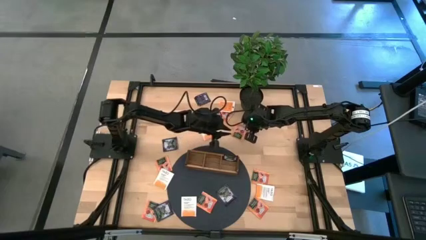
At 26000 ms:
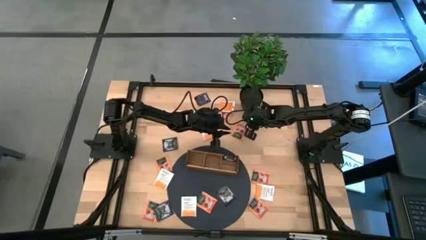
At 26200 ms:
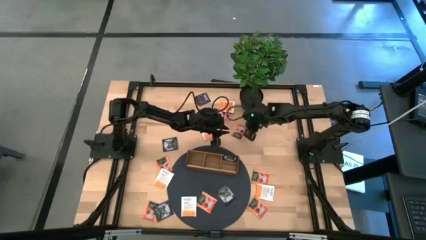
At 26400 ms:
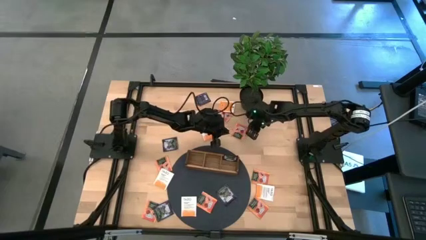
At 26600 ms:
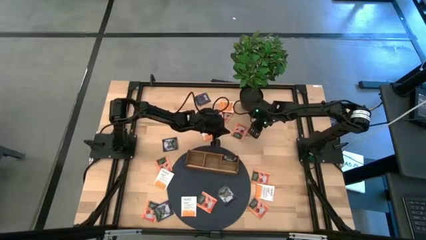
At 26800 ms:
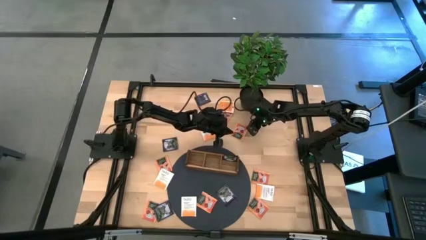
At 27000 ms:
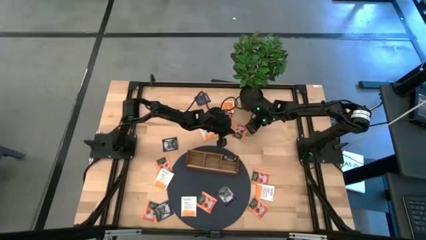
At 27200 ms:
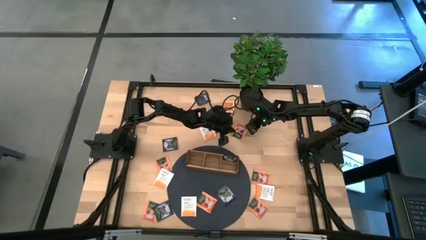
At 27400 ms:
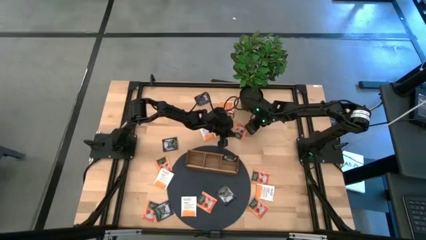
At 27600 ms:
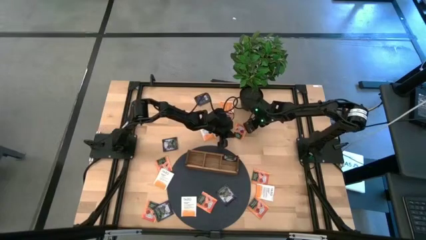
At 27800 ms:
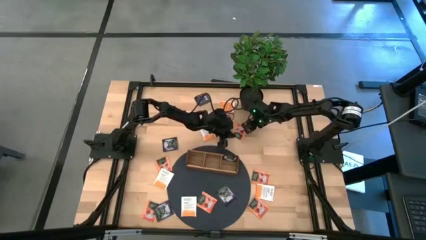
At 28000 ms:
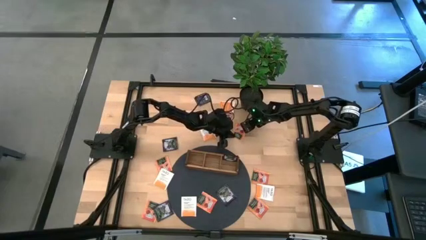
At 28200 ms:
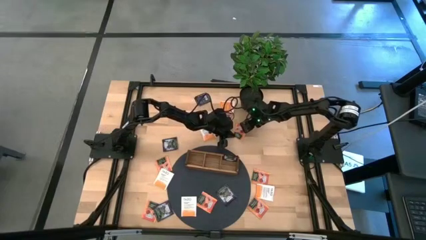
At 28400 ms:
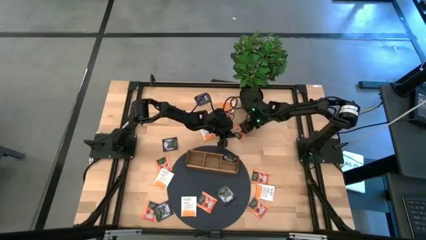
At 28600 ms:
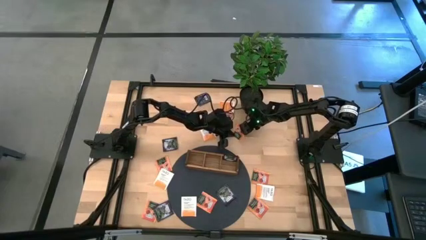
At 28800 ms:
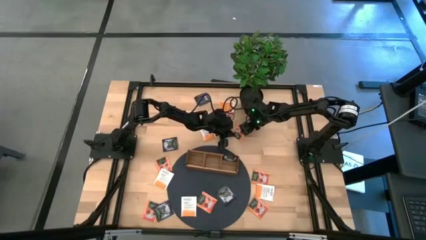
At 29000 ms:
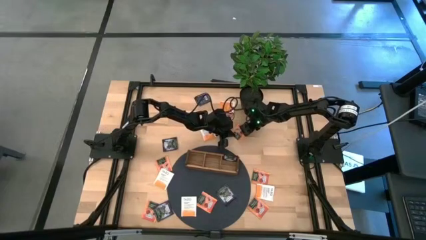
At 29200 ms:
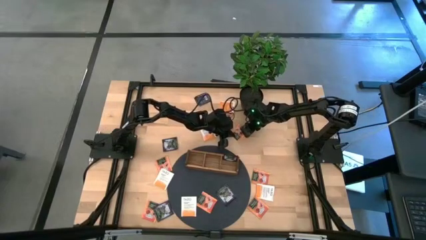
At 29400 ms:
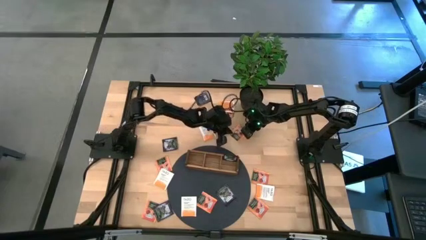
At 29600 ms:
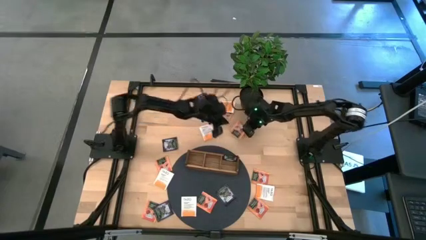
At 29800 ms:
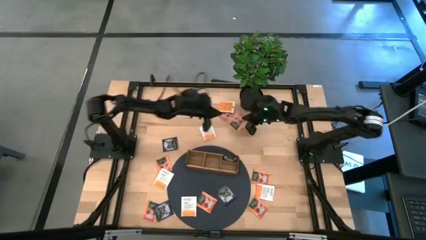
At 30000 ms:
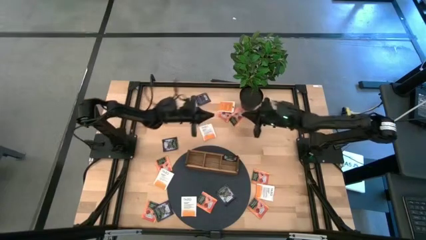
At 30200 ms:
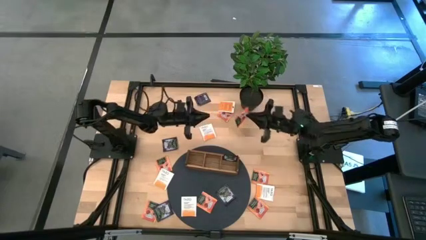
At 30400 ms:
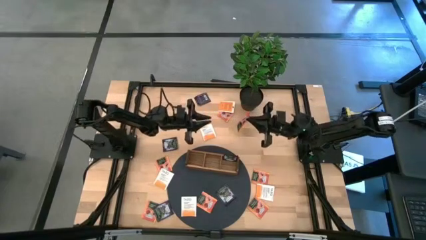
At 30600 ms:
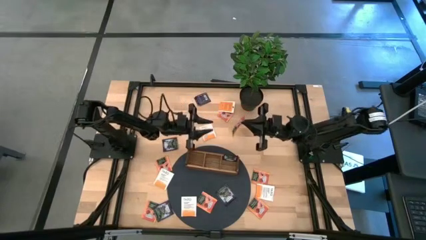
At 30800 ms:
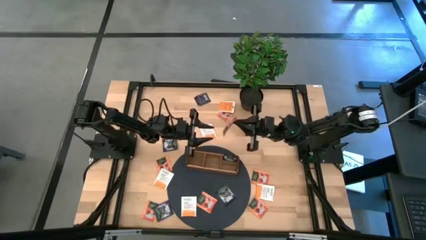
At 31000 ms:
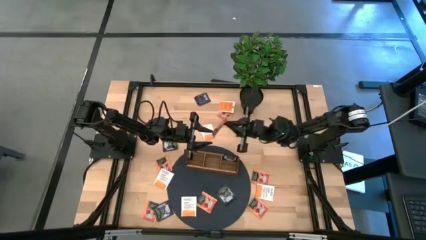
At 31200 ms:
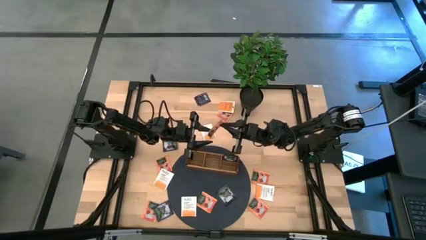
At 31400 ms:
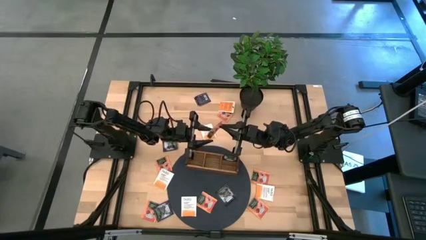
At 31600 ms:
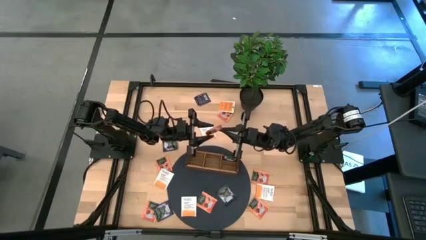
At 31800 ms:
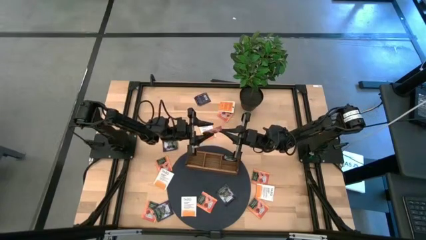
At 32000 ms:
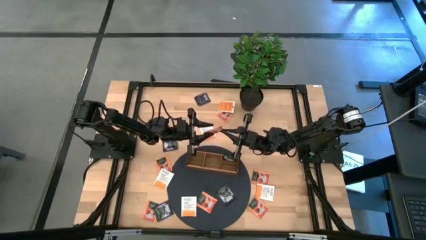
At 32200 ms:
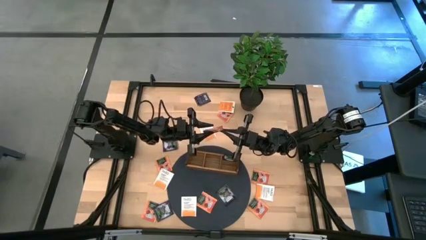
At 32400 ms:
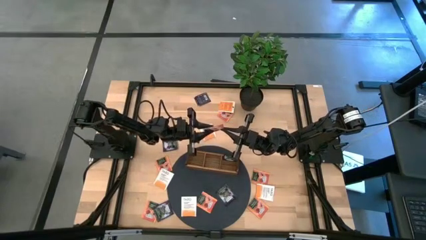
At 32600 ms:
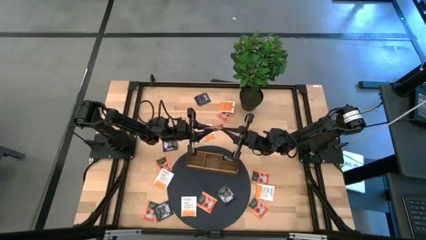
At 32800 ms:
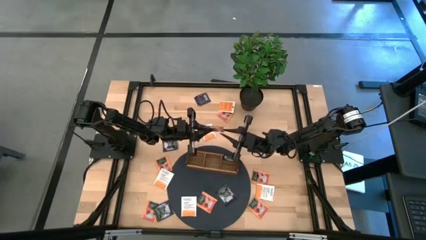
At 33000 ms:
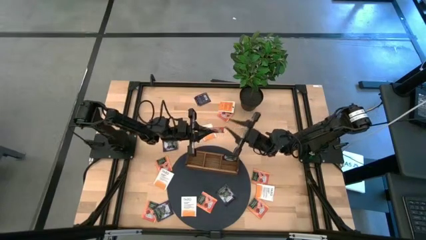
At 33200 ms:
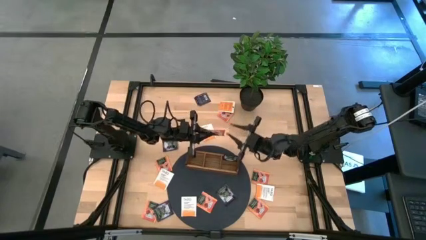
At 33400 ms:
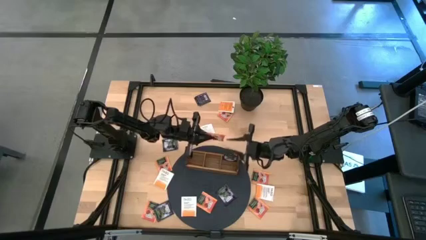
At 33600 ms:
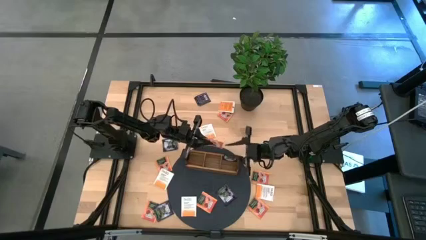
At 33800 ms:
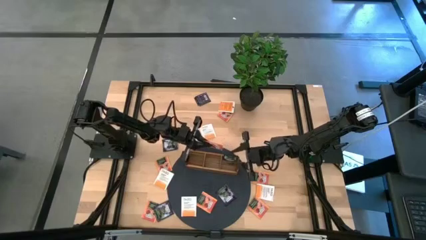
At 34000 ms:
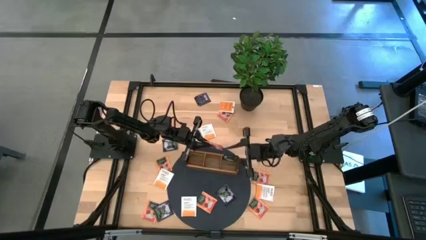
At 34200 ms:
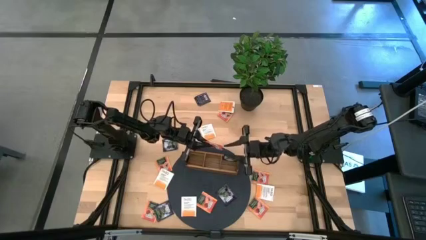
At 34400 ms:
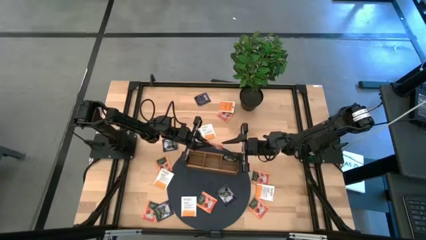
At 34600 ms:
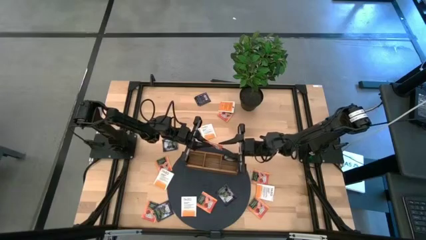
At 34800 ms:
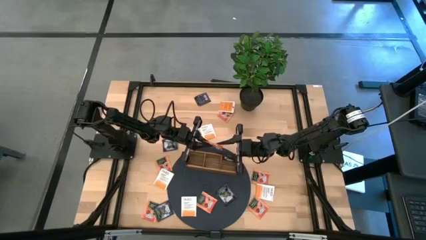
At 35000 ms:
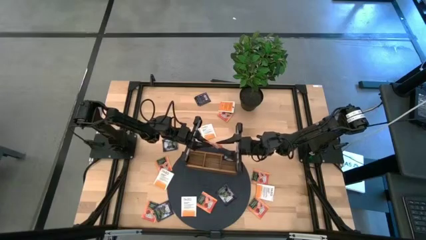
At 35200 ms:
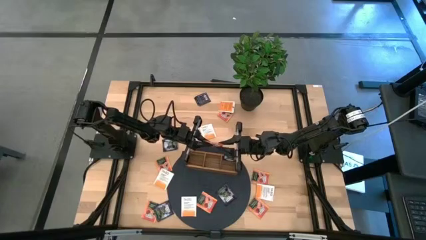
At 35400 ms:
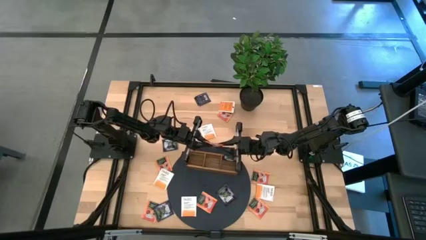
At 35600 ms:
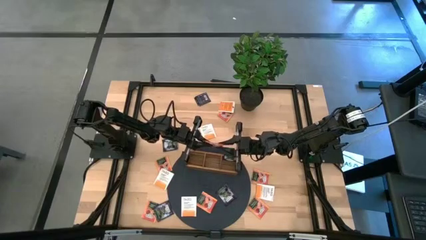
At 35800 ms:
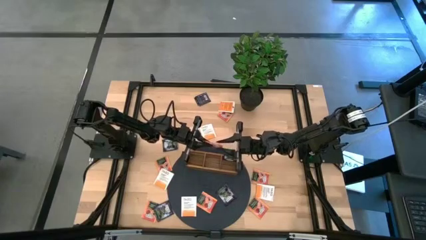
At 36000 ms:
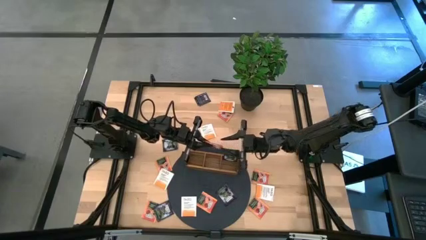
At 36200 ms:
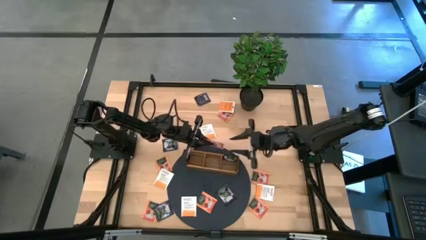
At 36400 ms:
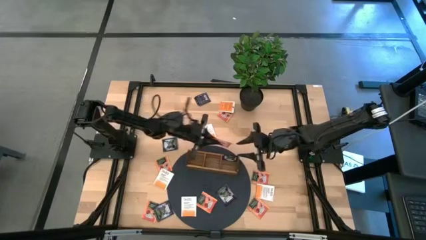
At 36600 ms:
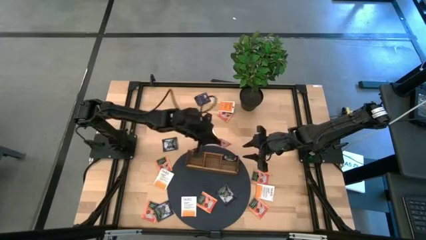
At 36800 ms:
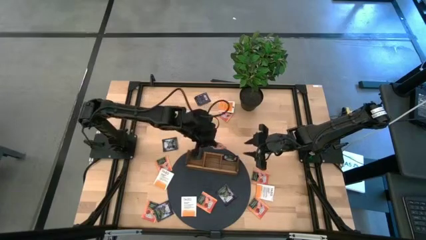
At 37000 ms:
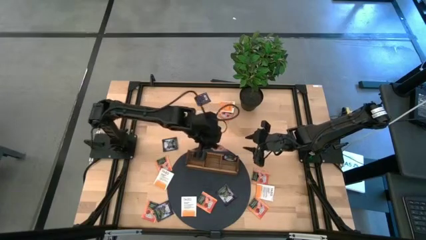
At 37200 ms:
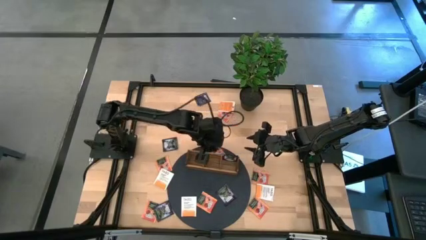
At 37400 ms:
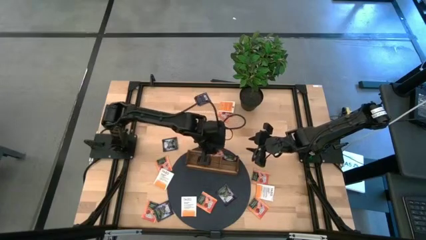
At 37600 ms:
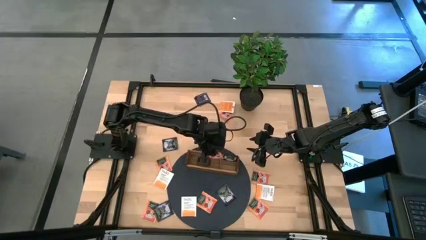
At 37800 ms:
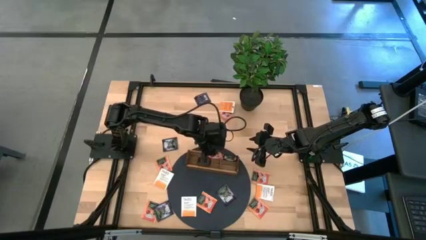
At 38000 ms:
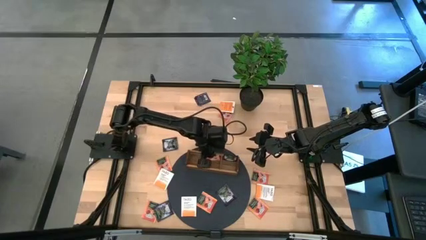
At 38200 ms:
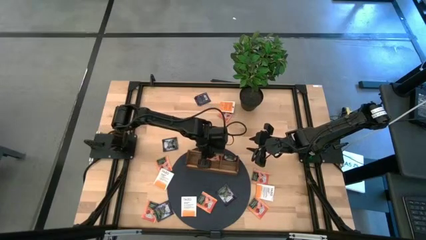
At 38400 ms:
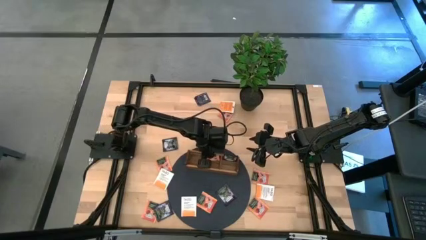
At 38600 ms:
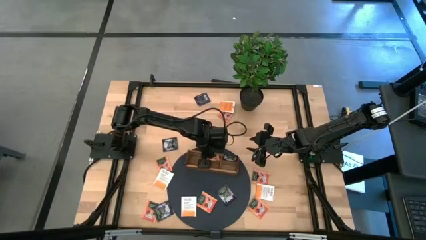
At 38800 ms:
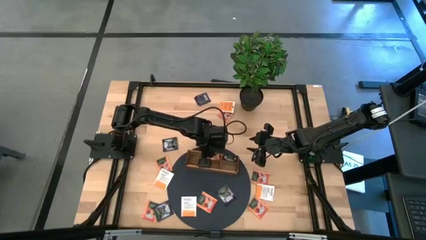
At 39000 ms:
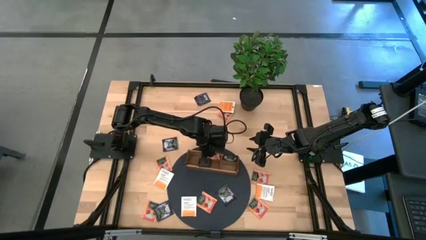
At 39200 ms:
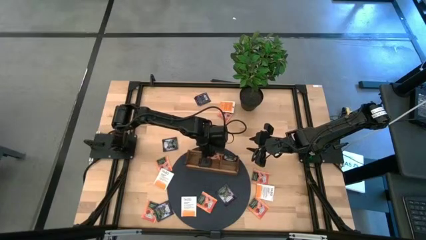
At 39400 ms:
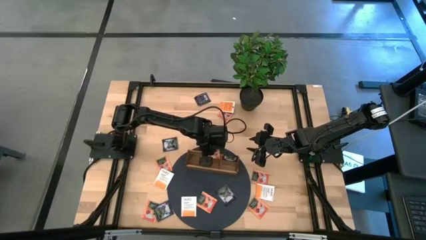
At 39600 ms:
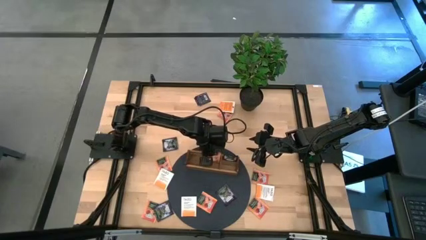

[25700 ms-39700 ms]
Task: Pick & Place Tea
Put the orange black tea bag into the middle section of the wooden organizer
